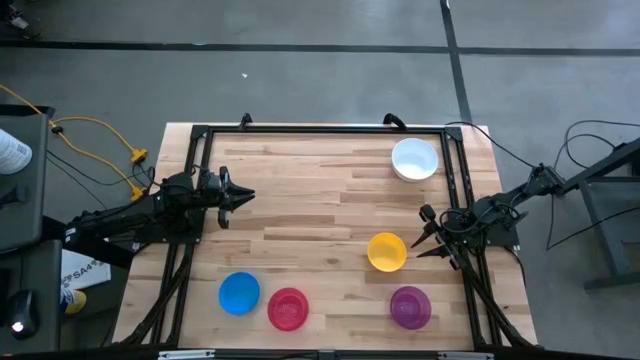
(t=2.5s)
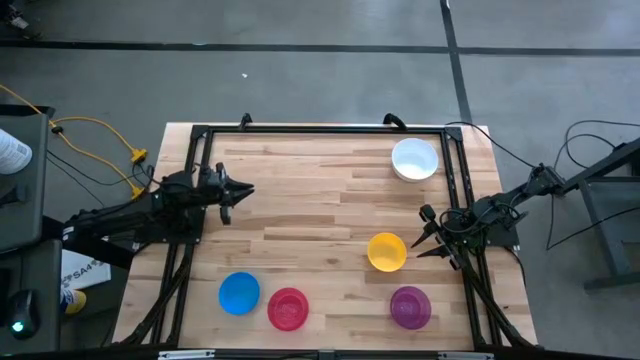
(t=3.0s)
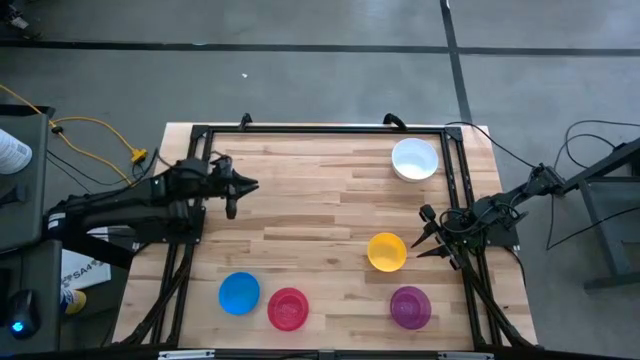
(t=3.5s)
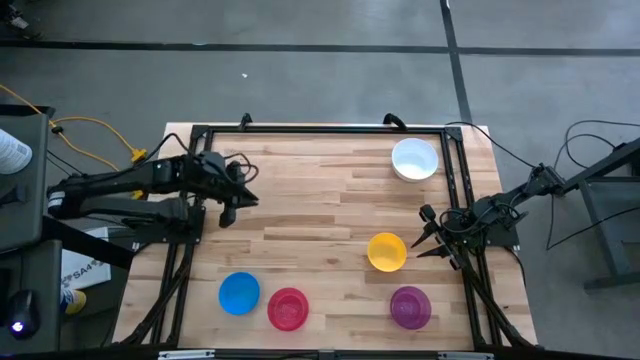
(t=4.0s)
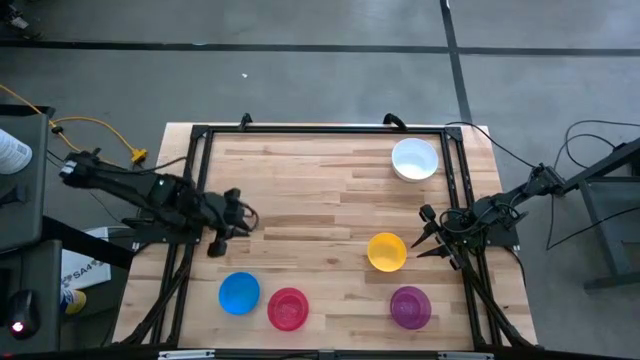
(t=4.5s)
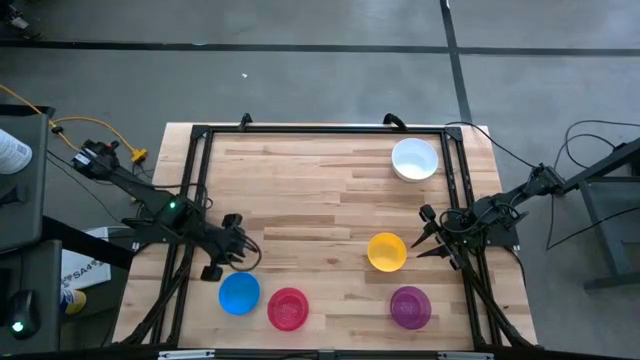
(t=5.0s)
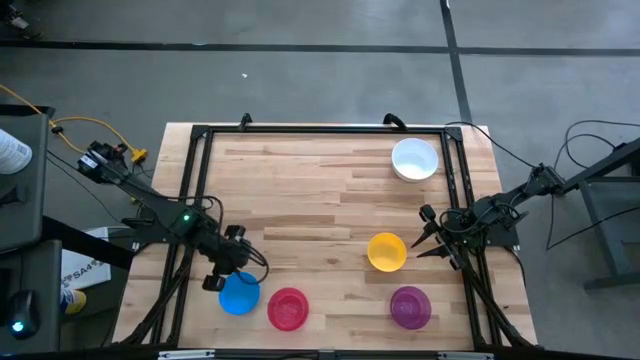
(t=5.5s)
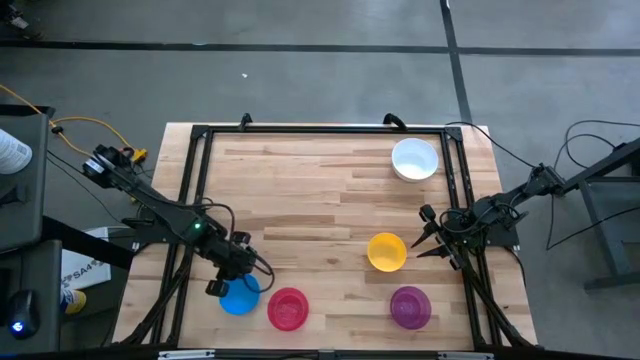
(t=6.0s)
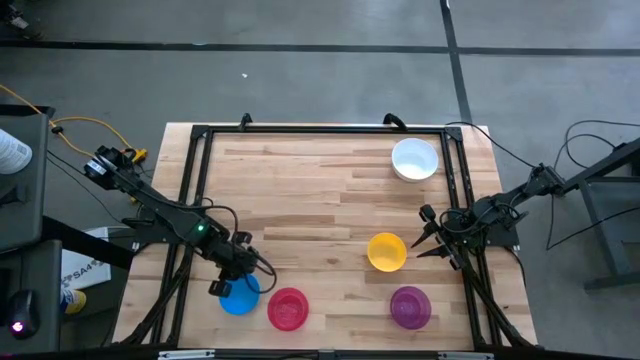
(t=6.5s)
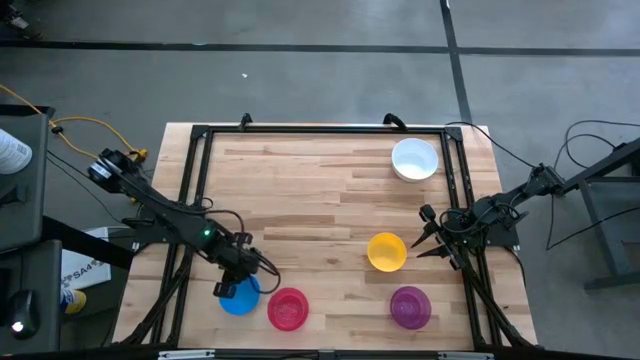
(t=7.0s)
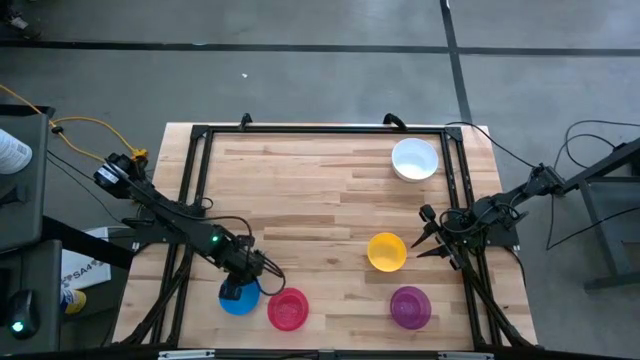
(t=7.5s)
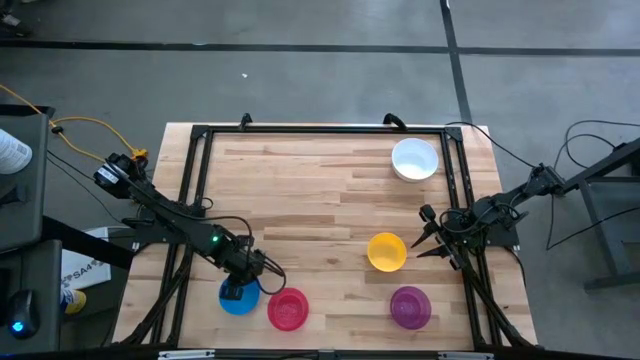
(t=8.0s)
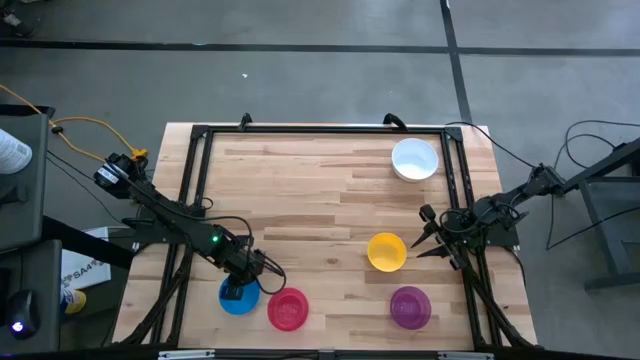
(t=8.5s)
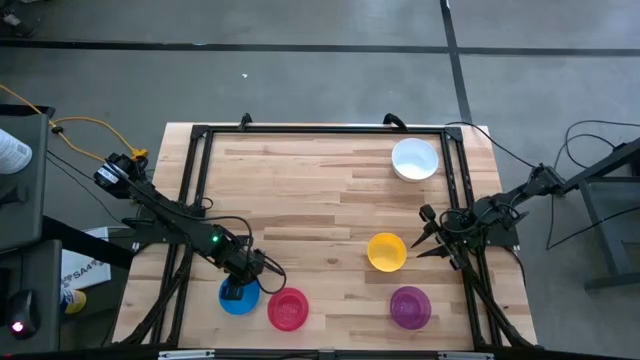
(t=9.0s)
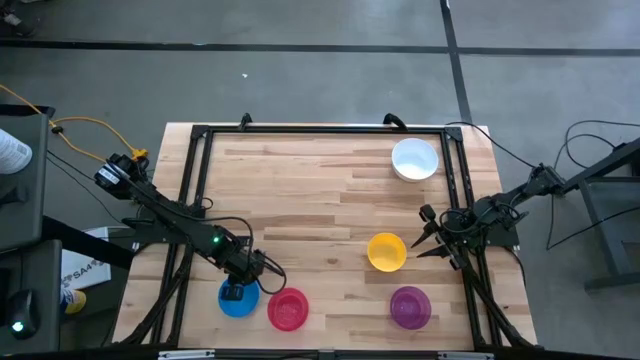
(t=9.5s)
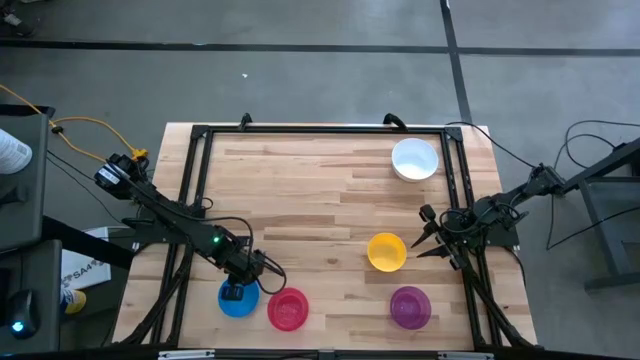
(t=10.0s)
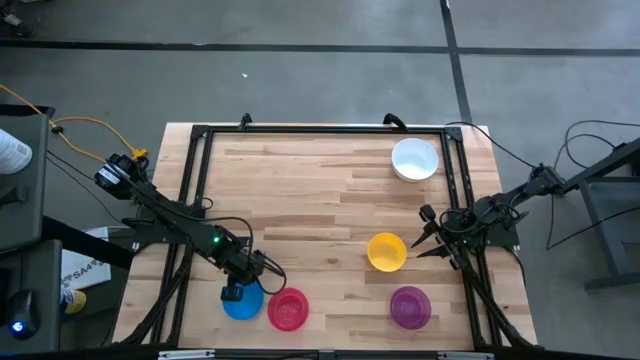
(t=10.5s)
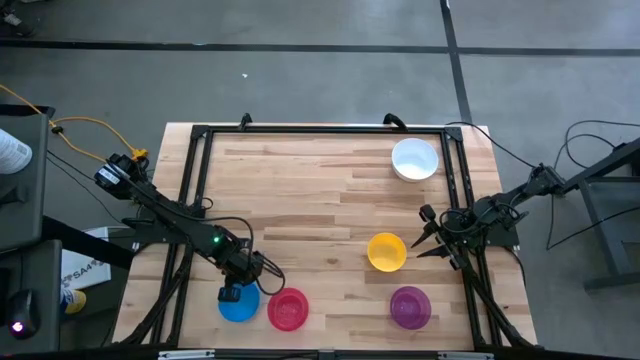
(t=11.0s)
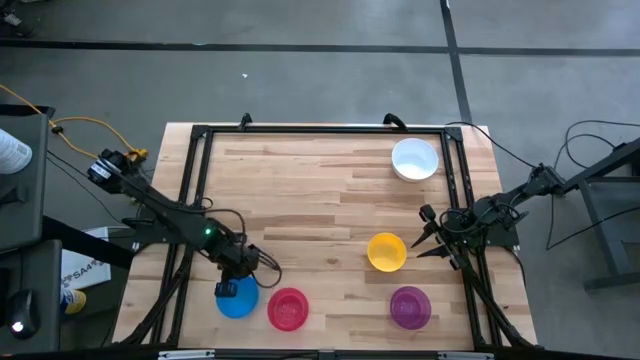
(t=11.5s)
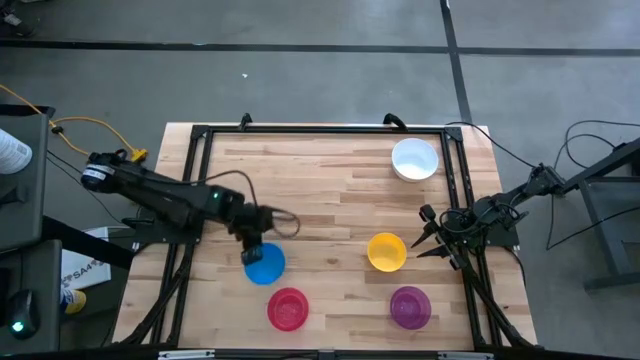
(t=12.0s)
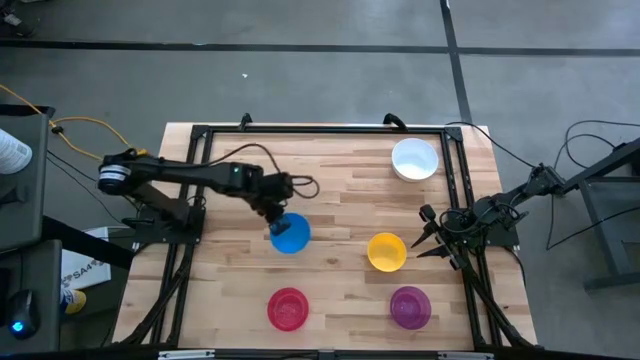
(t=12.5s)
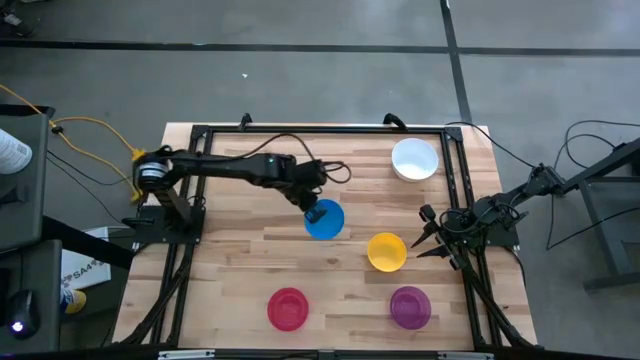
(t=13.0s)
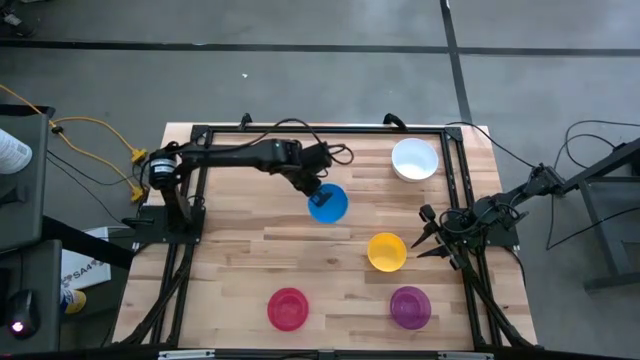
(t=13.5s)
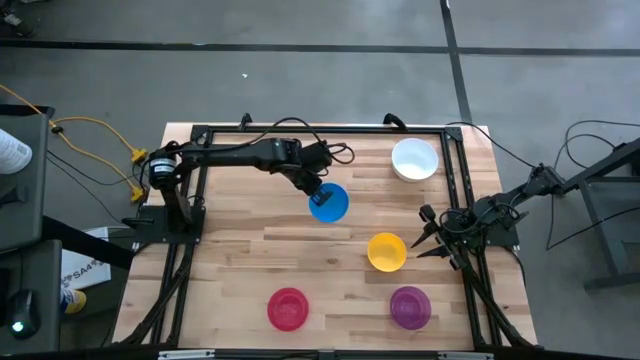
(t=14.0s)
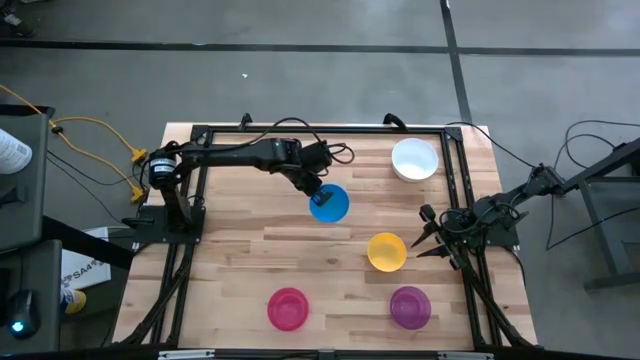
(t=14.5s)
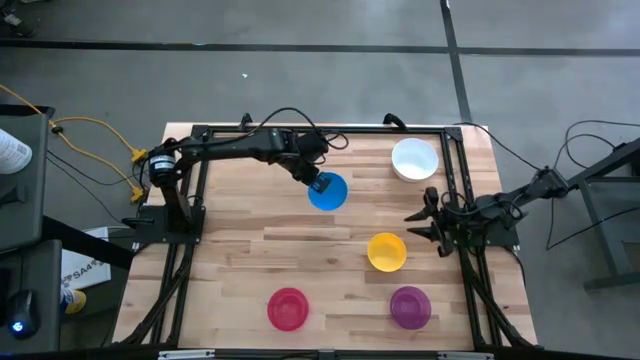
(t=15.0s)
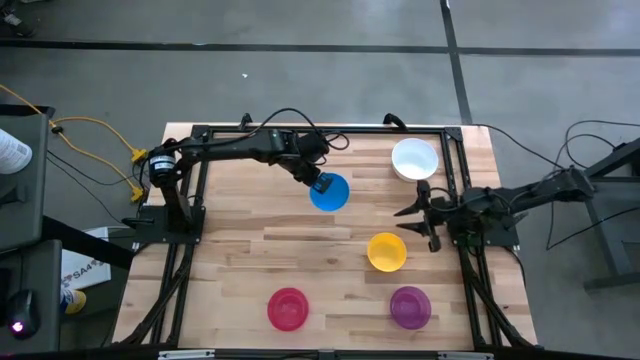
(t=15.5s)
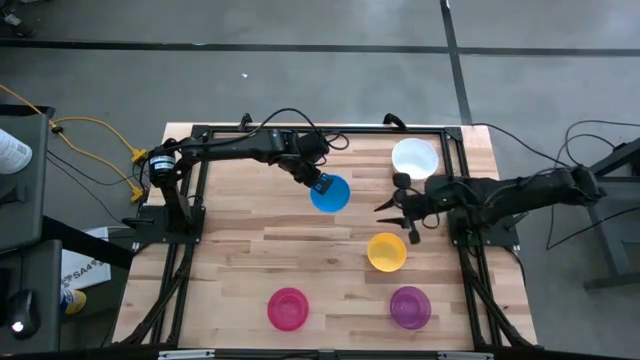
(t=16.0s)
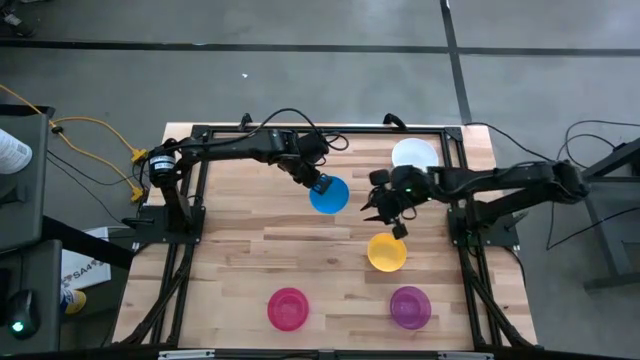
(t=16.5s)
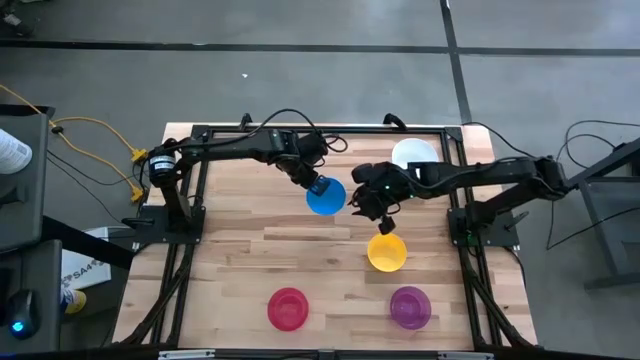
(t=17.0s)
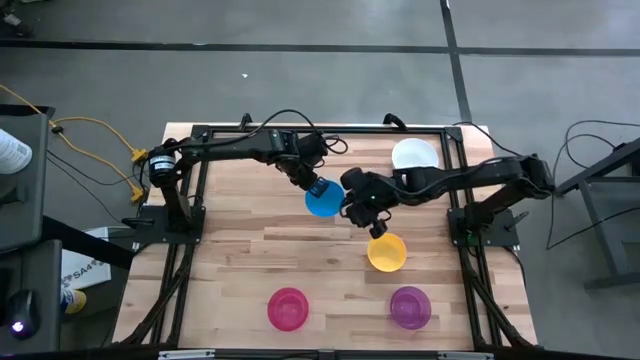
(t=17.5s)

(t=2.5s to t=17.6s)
Stack the blue bowl on top of the white bowl

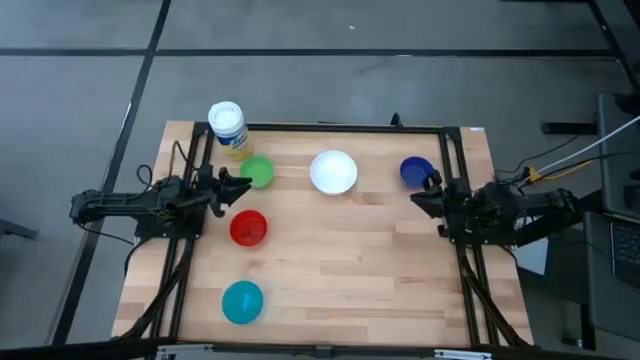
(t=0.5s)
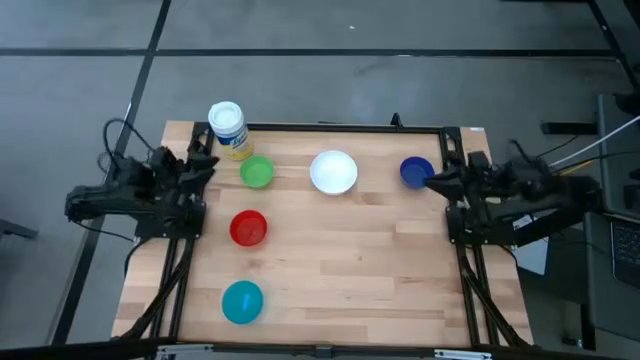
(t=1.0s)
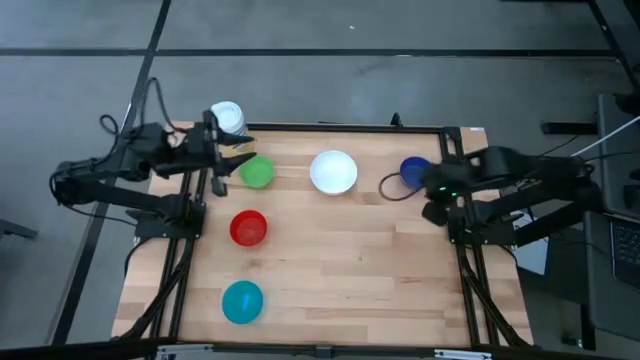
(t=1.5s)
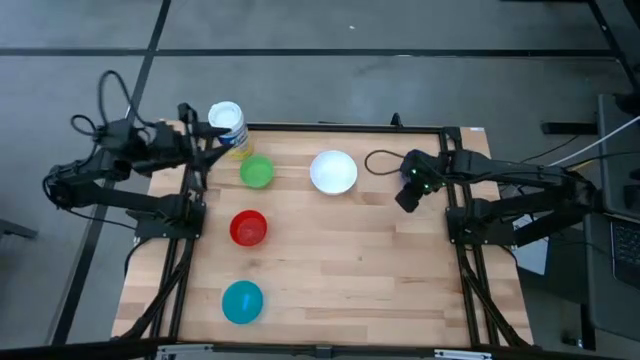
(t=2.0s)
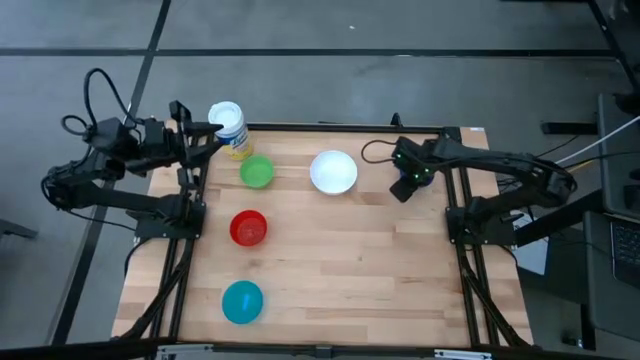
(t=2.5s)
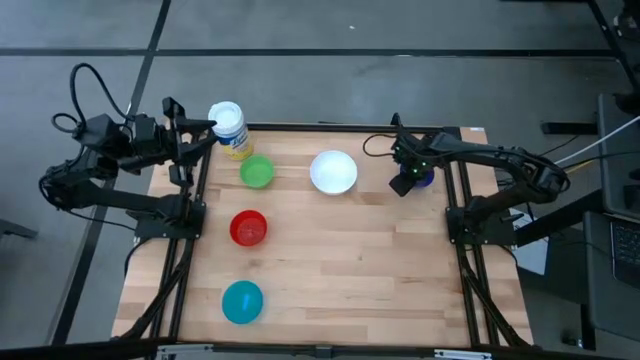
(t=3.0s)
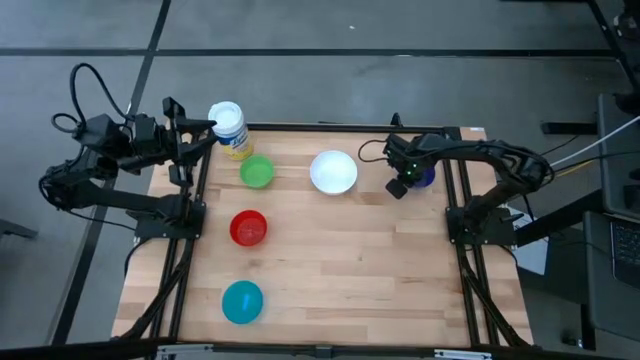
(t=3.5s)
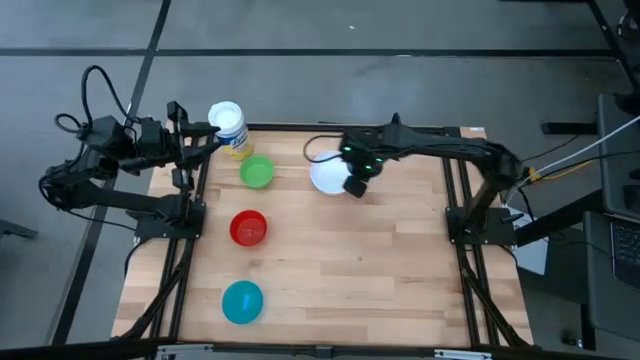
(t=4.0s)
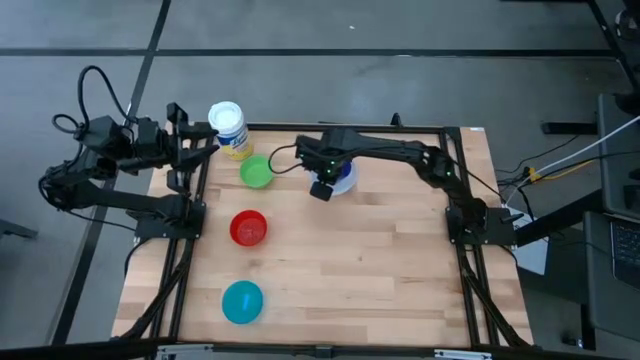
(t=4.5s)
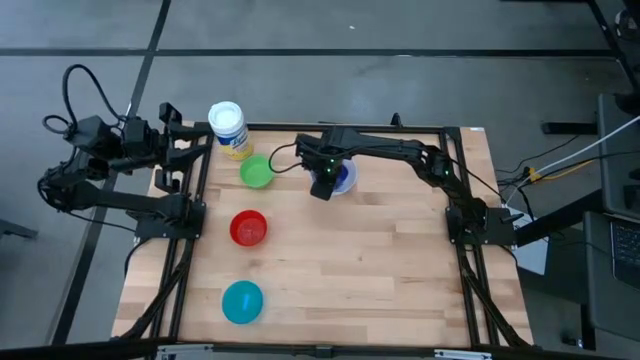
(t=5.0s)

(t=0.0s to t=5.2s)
Stack the dark blue bowl on the white bowl

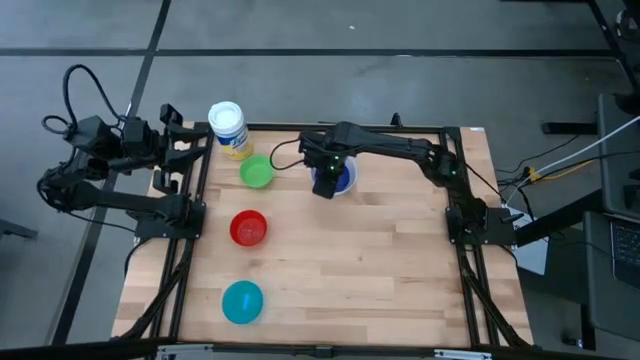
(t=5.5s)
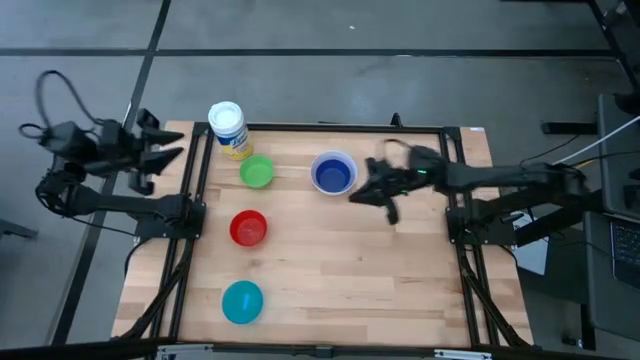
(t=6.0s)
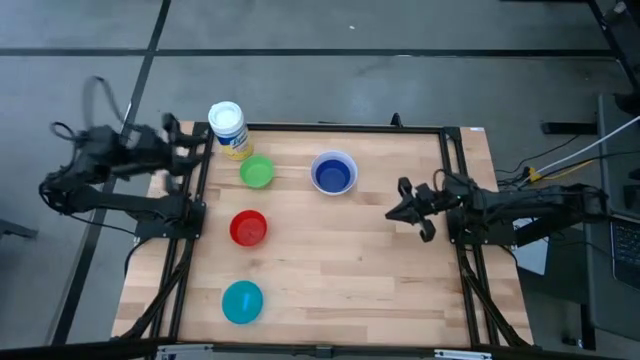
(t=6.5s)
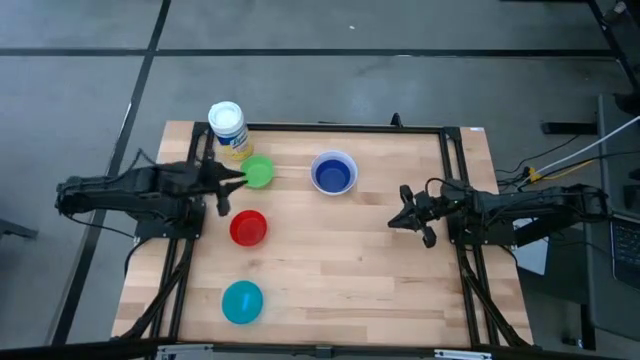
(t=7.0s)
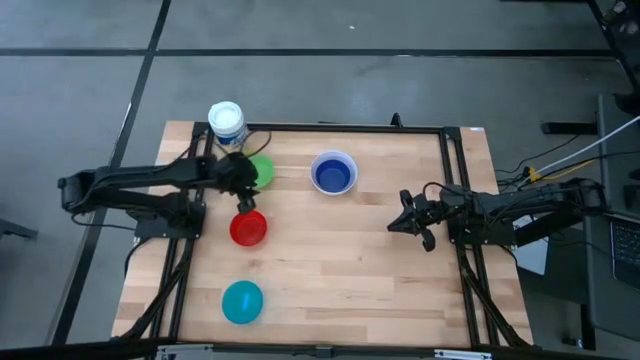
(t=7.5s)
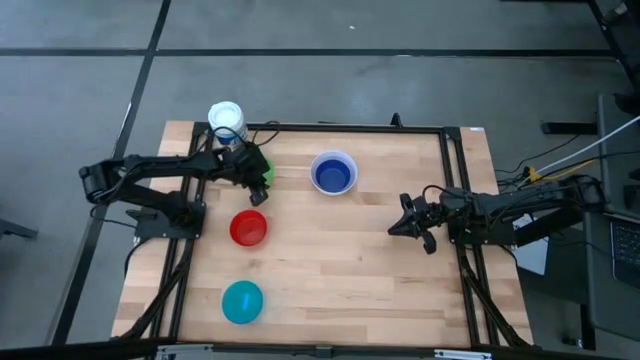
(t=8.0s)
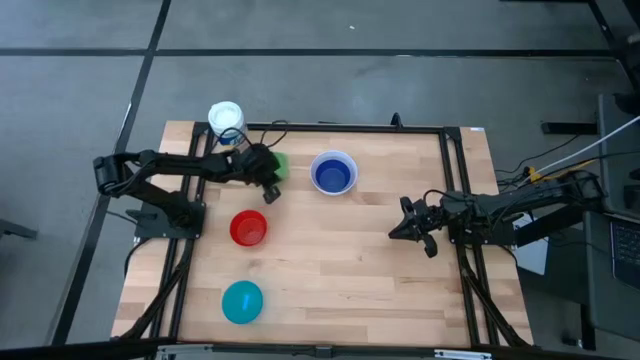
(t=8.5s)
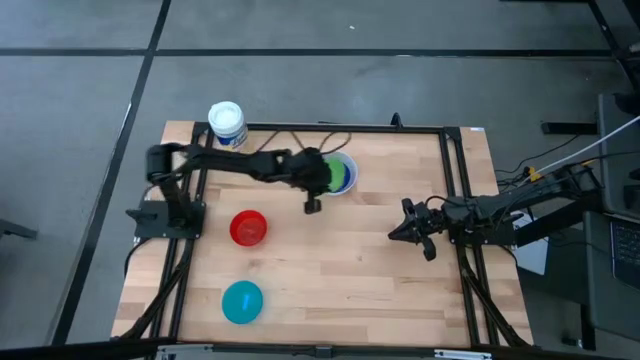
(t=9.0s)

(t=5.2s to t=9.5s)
Stack the green bowl on the dark blue bowl
